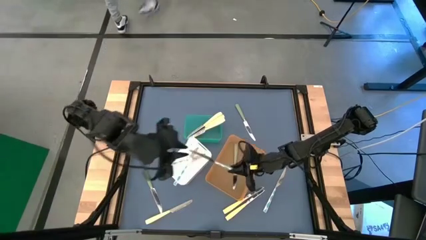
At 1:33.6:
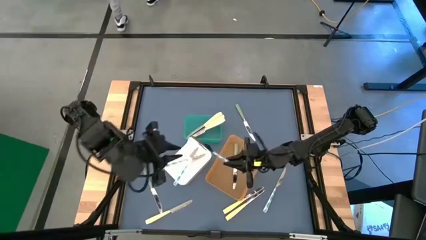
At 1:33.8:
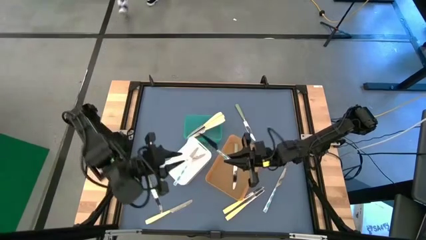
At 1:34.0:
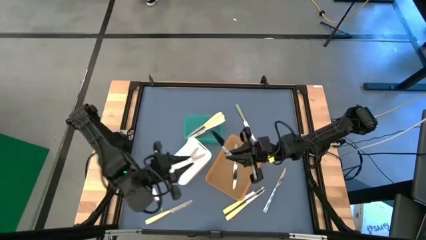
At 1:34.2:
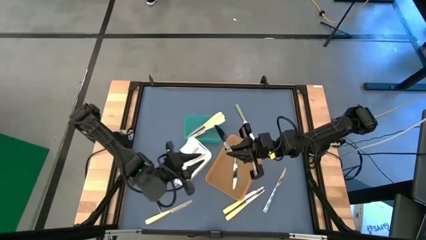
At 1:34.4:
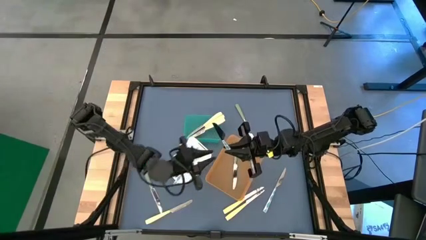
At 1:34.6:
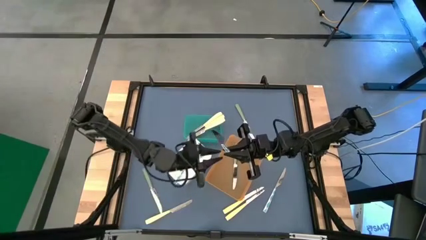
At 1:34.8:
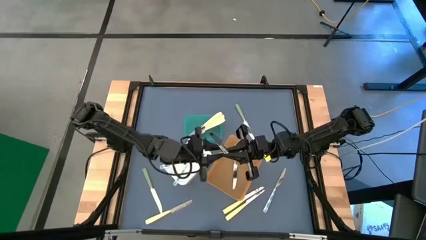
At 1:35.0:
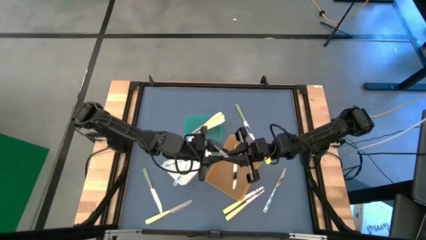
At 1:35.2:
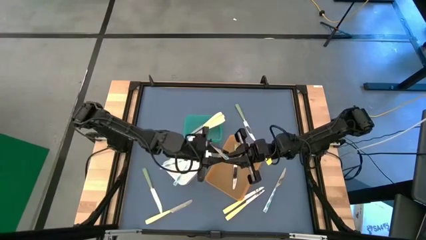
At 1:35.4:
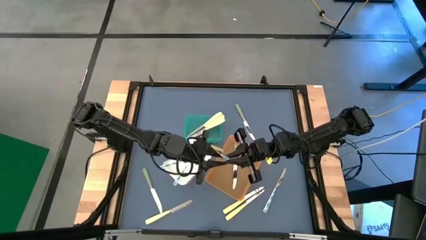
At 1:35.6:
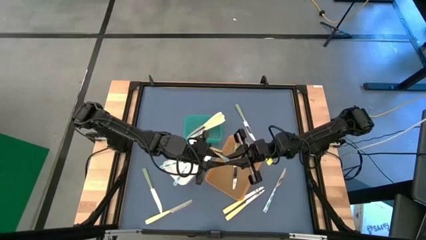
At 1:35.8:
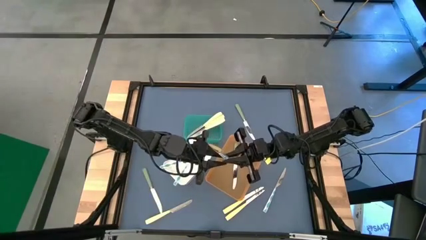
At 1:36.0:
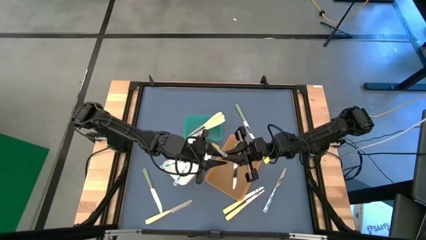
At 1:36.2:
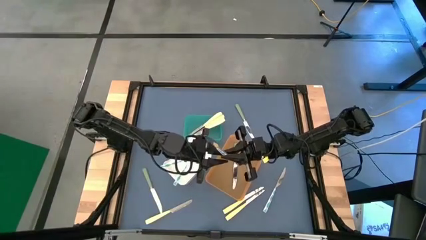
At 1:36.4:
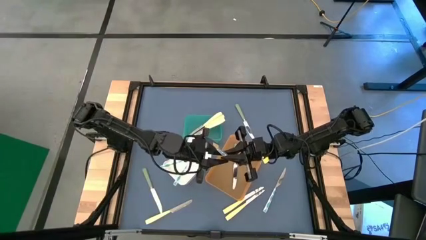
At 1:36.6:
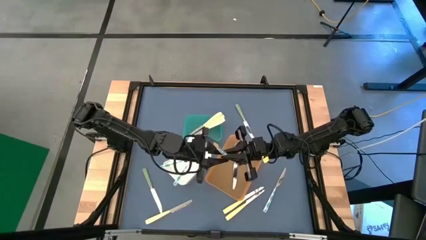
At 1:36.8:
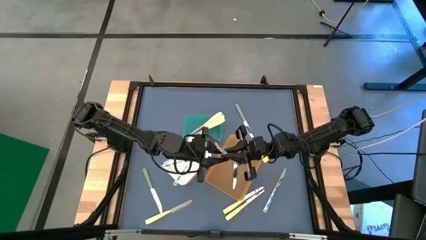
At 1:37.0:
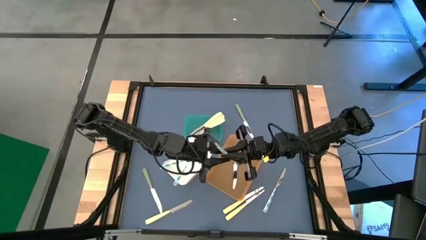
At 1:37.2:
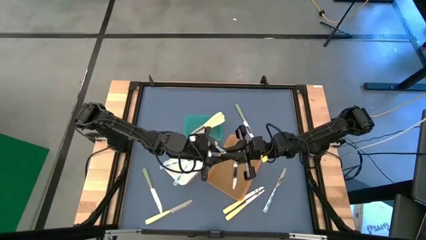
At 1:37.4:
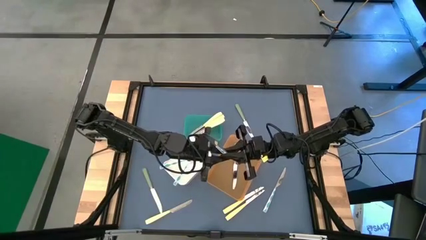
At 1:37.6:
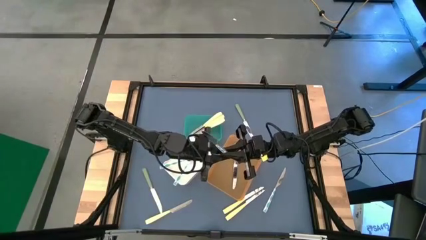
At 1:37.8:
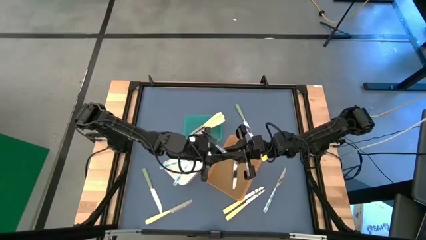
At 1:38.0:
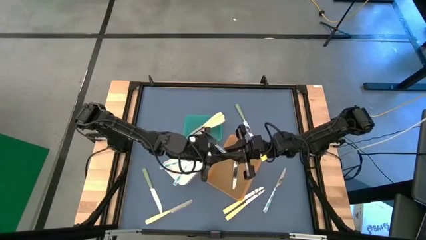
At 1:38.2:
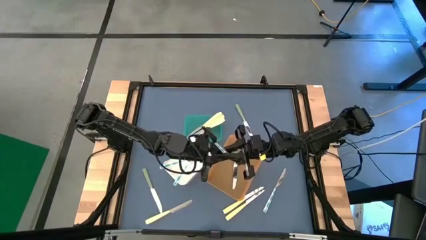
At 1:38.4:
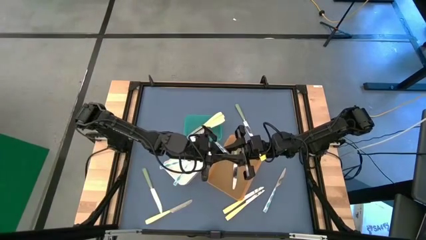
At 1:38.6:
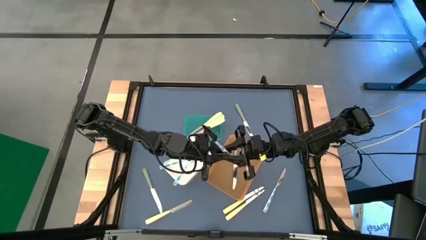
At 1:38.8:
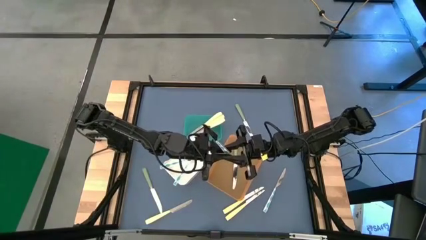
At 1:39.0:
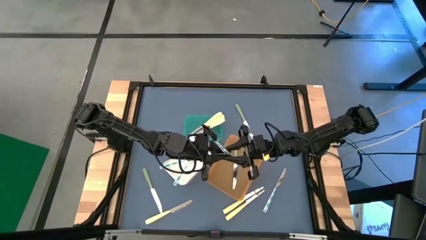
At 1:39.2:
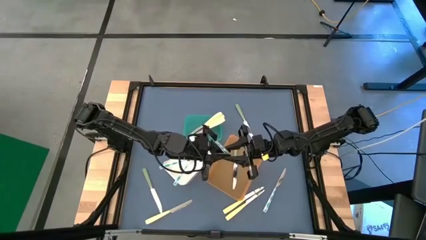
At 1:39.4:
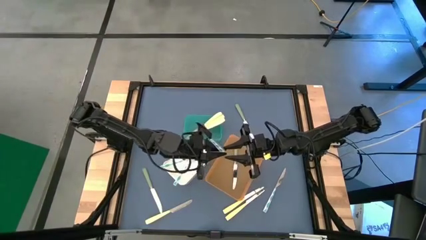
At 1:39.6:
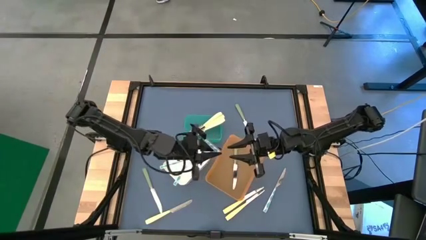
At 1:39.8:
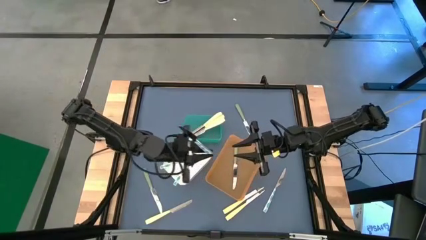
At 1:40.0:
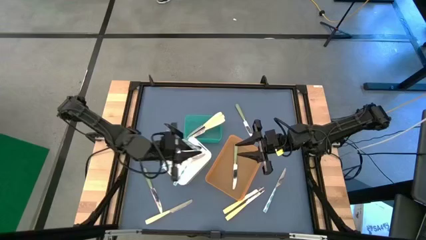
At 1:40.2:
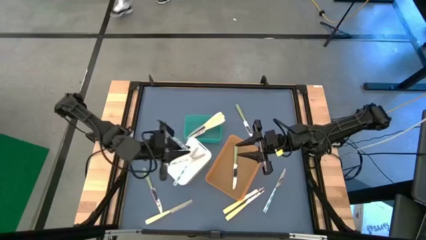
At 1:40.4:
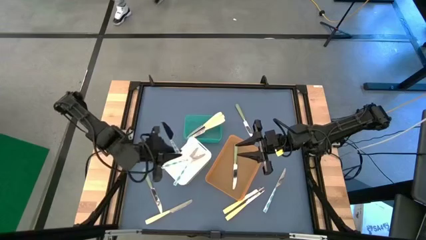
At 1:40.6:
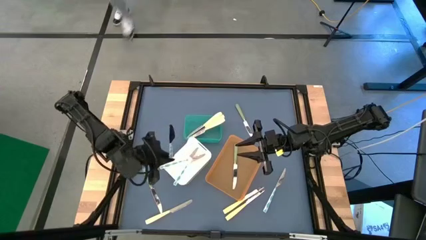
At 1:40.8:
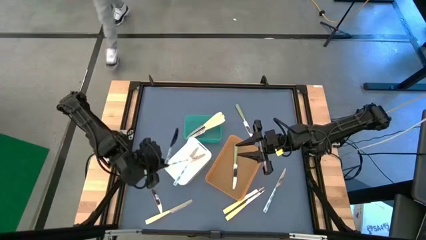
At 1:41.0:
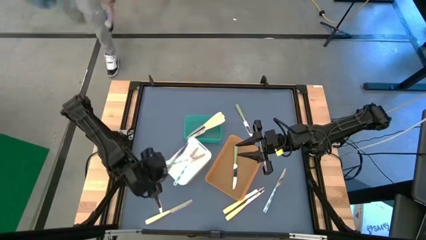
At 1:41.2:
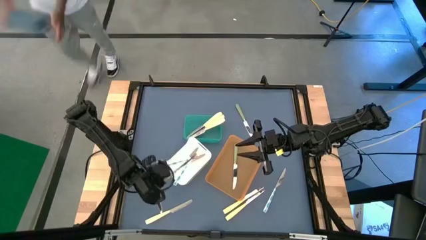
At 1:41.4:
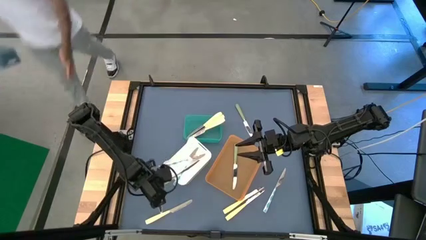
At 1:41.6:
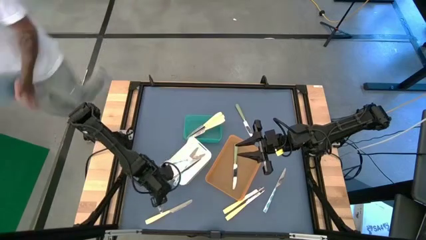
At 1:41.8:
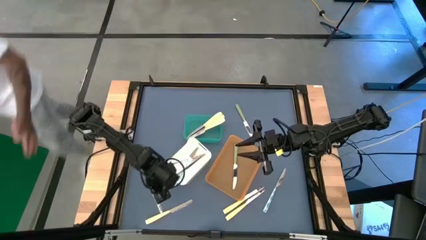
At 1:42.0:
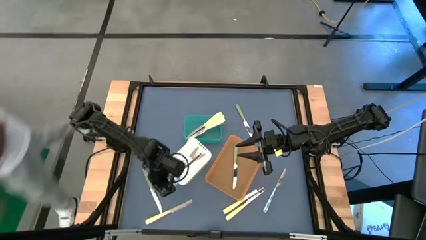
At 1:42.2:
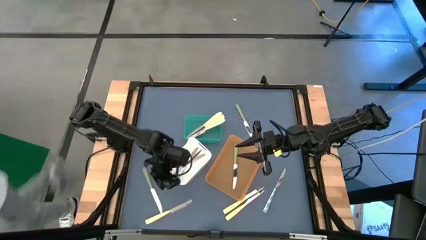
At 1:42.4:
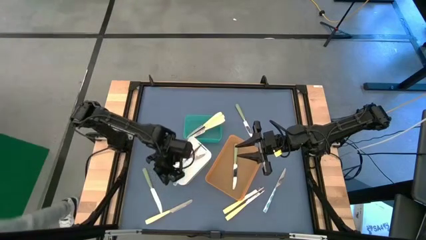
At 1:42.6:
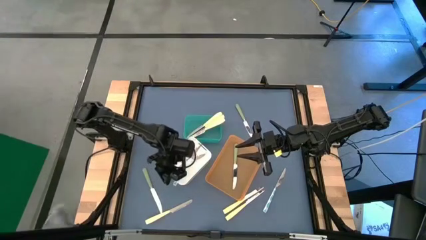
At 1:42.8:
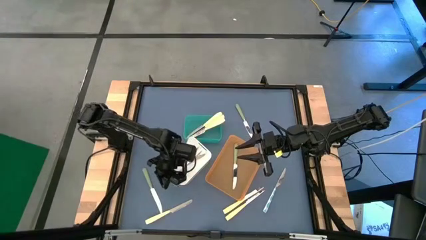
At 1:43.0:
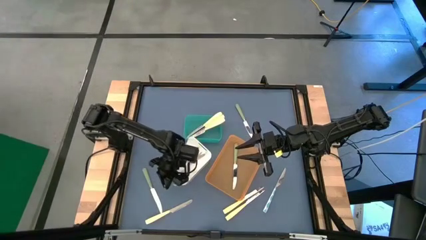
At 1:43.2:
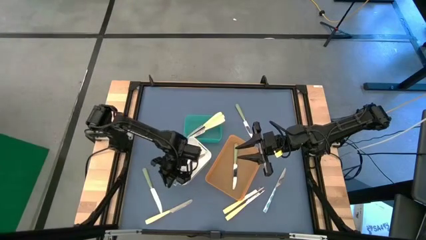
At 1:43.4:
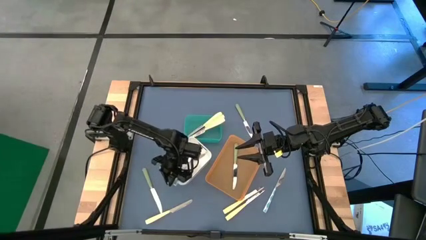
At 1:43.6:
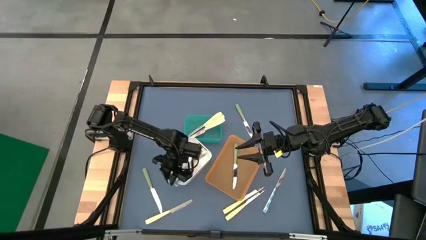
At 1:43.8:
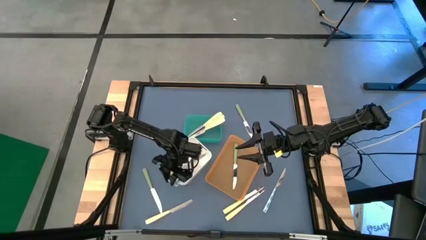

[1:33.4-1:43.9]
Task: Sort silverware by color (type)
Put the blue patterned knife into the white bin
